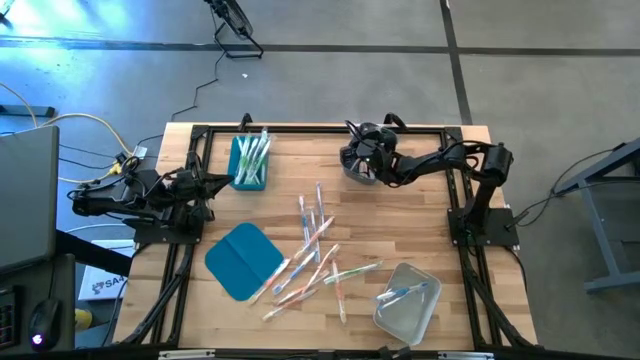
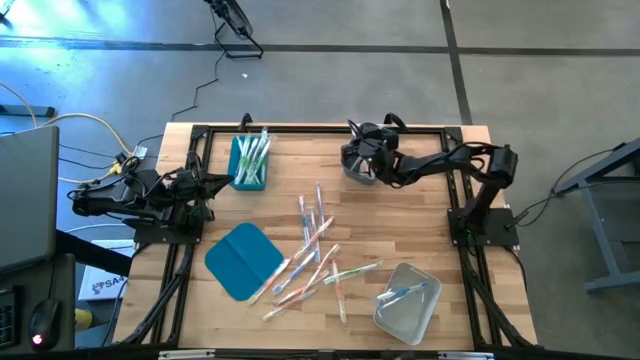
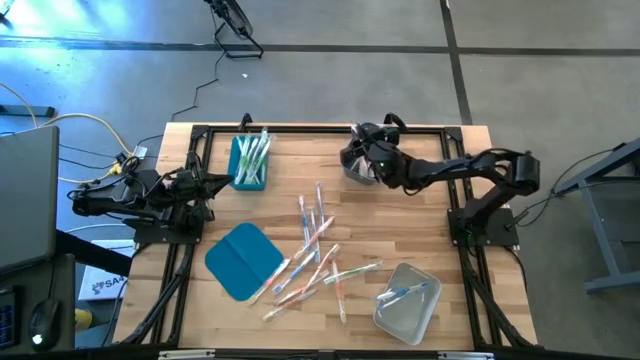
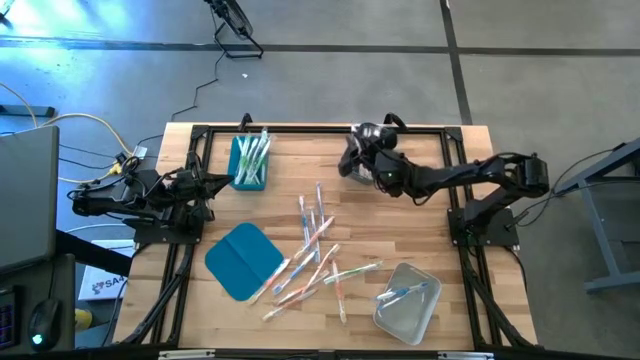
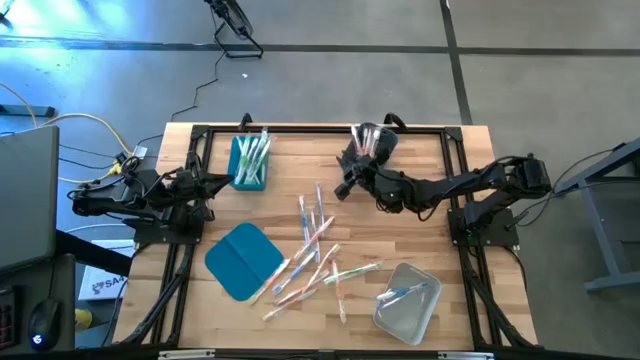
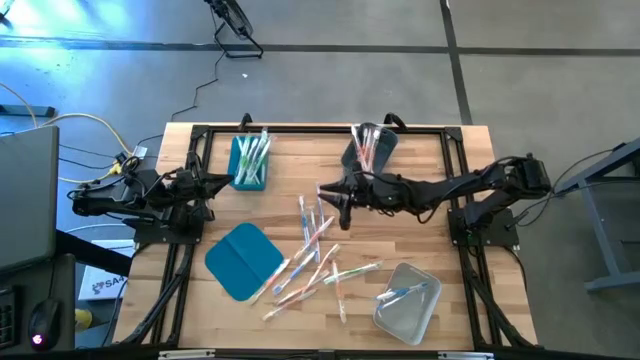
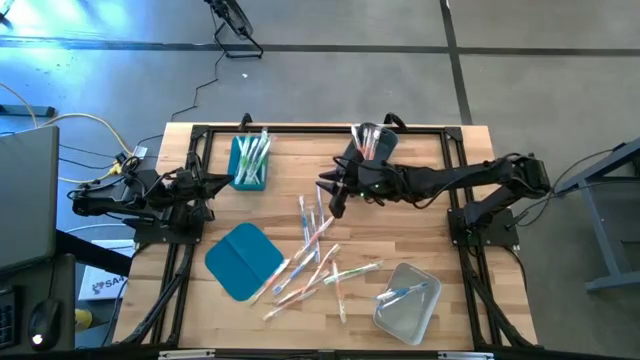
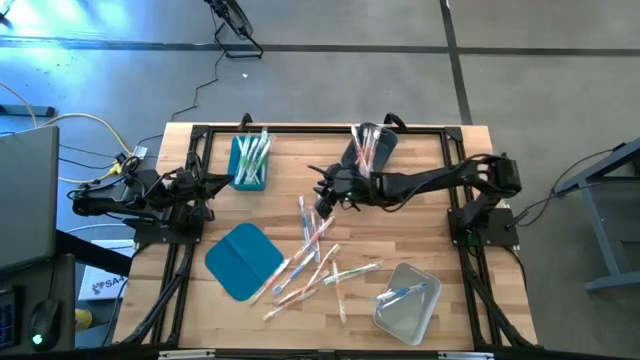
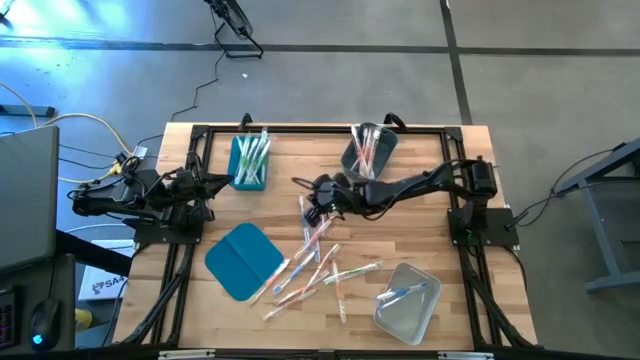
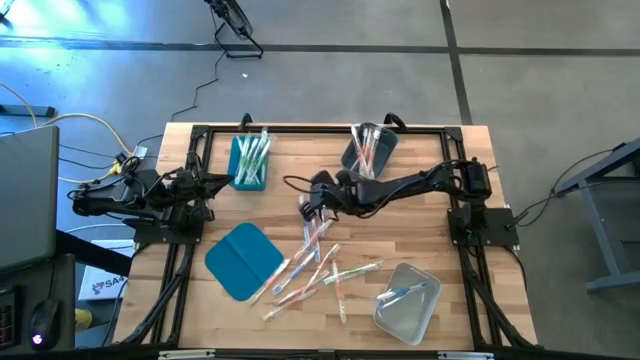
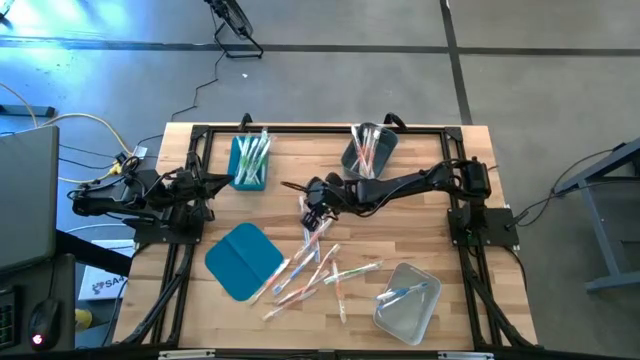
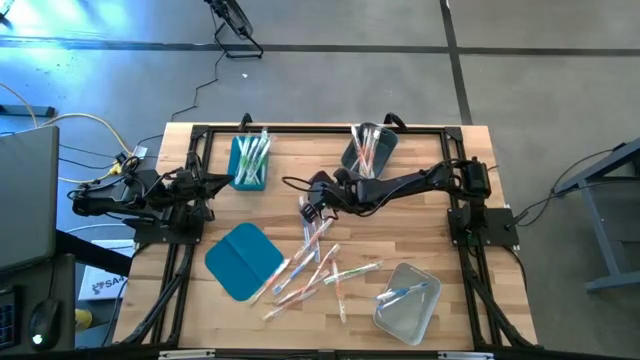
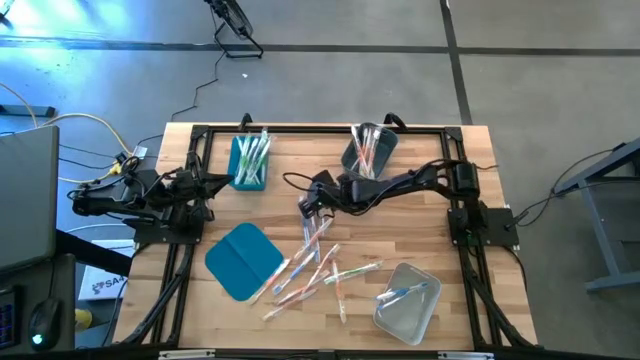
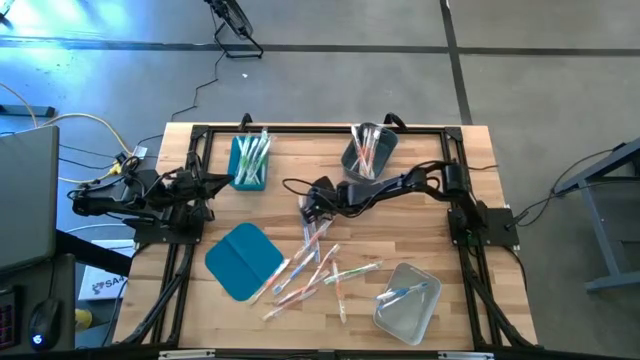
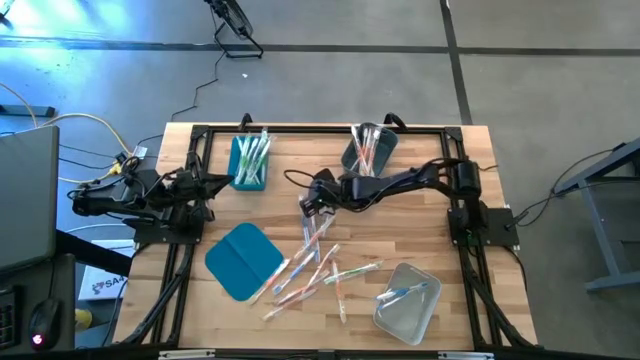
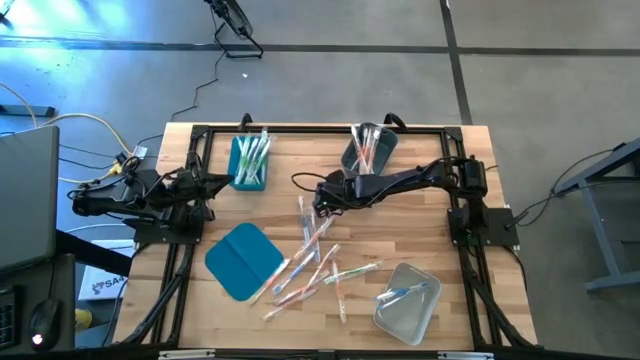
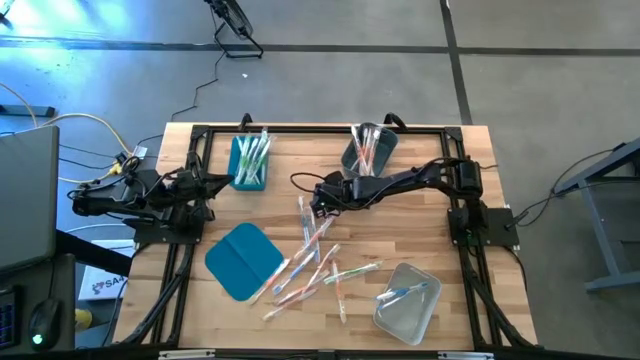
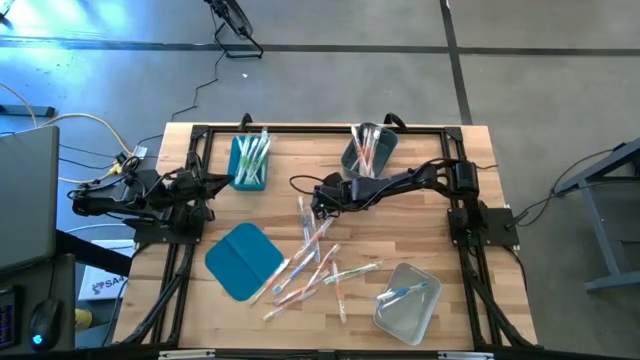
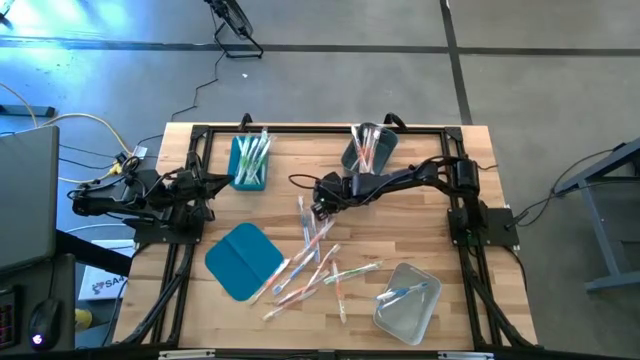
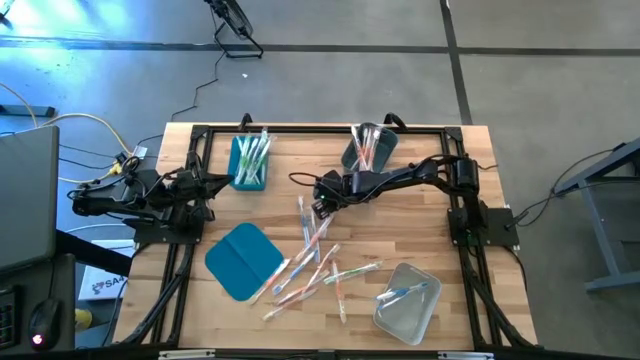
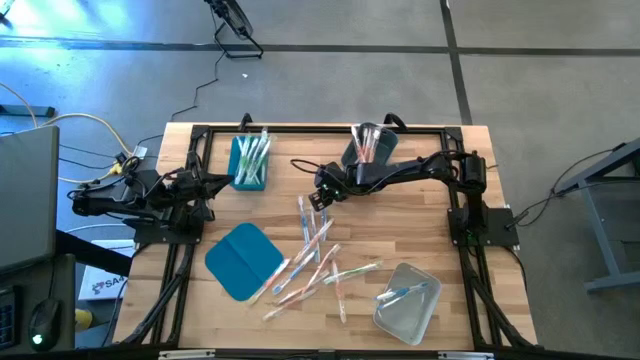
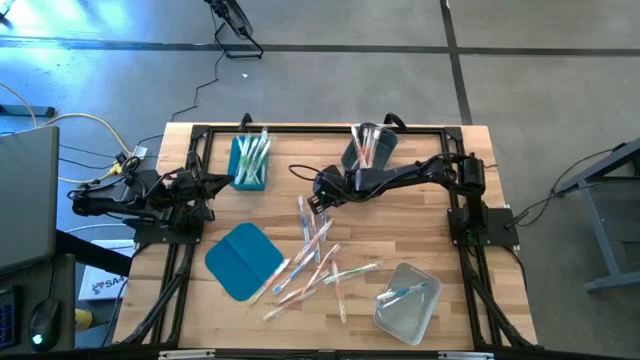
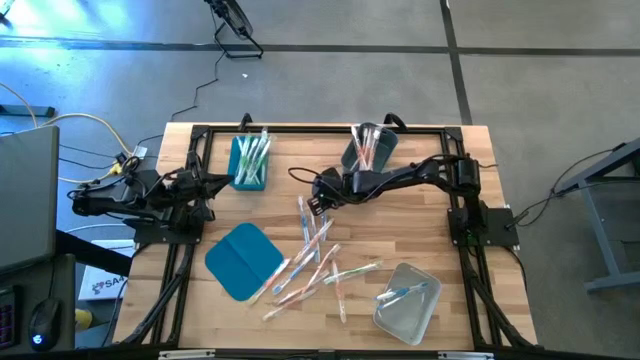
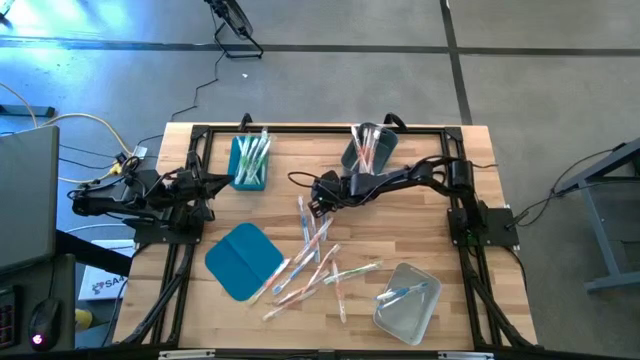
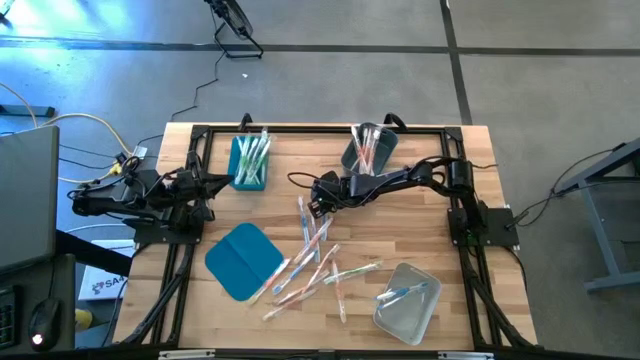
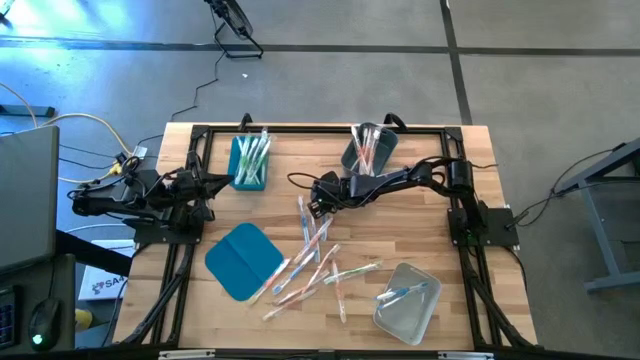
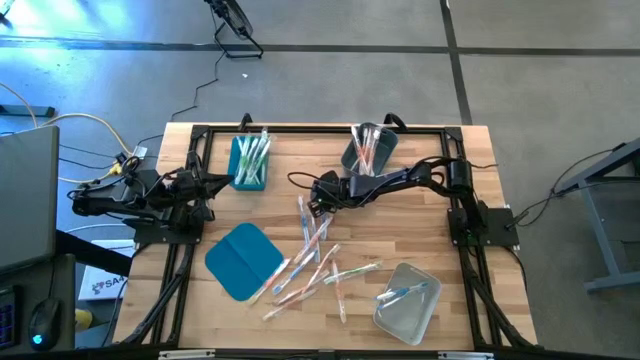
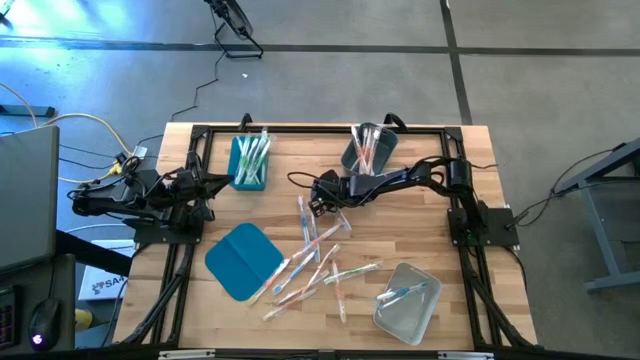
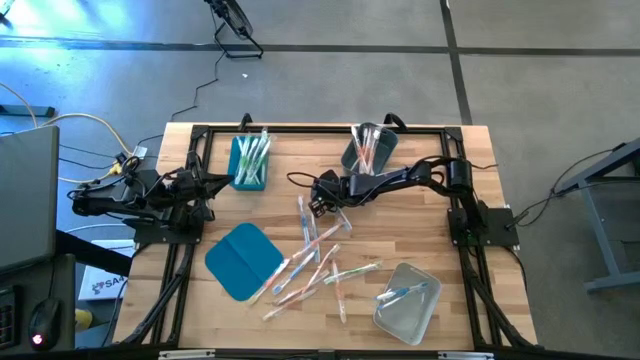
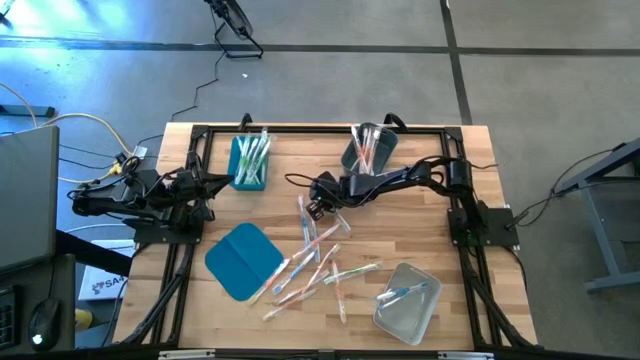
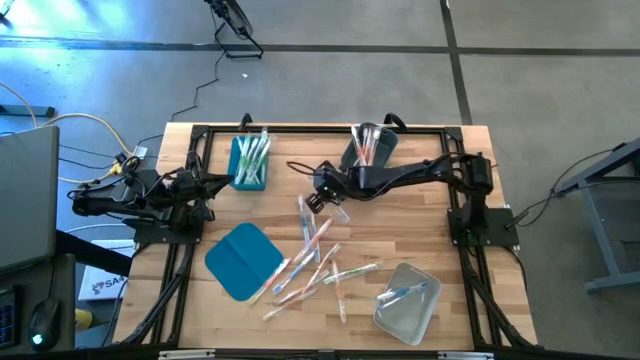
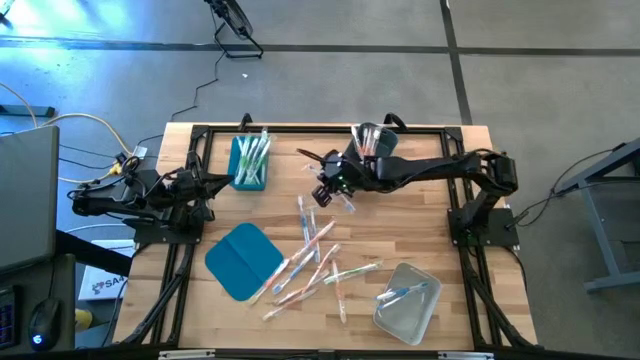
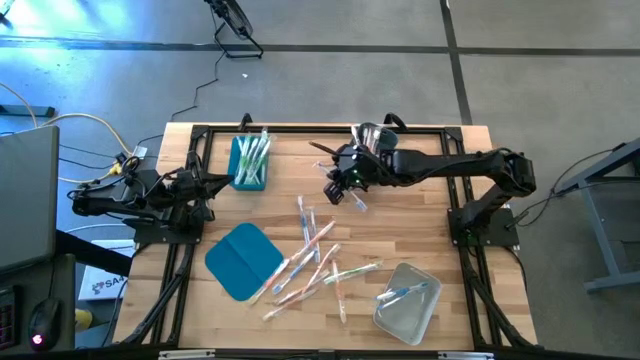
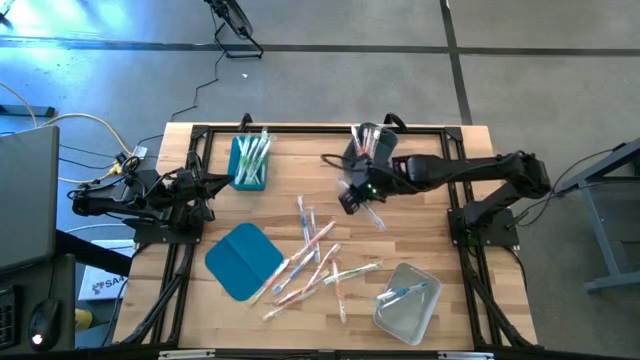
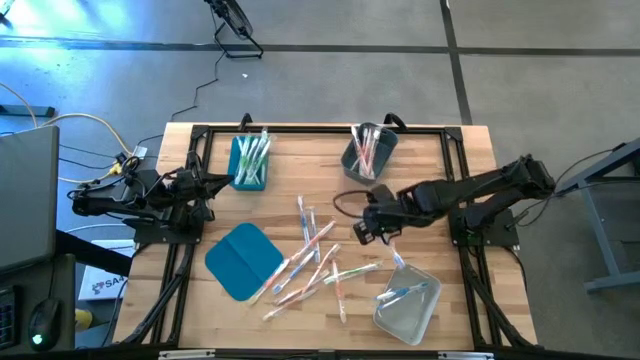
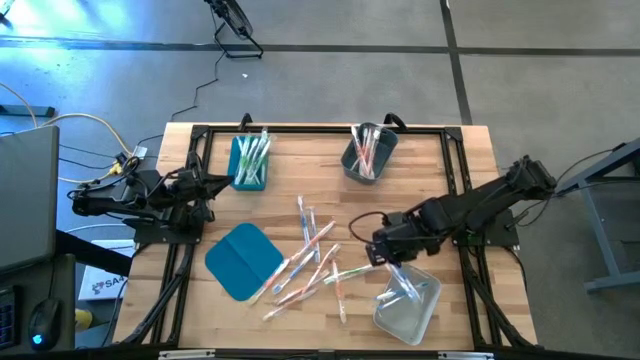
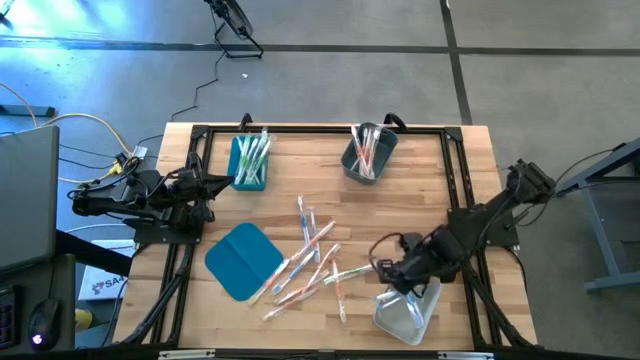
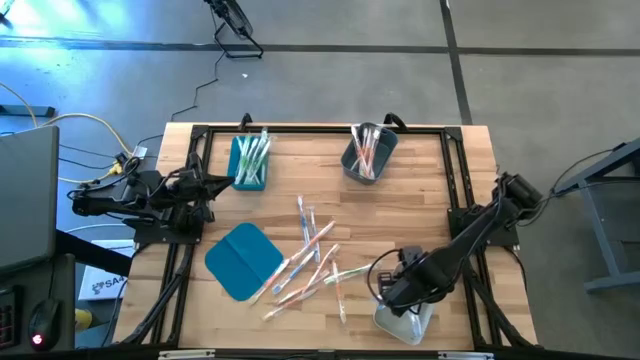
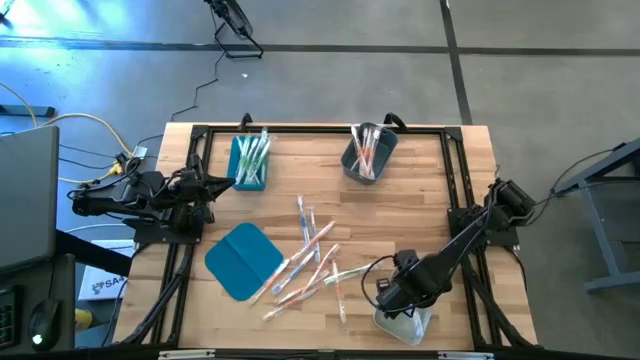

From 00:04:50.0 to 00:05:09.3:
Task: Pick & Place Toothbrushes
Put the blue toothbrush into the light gray bin
